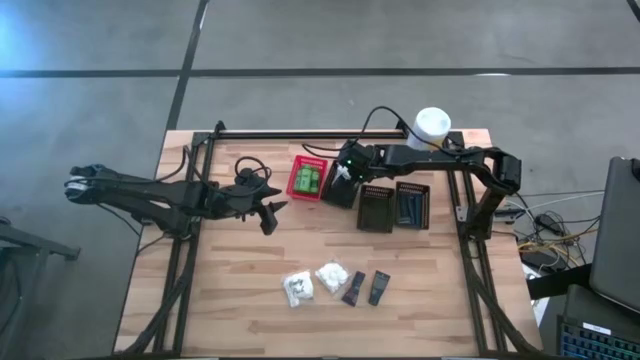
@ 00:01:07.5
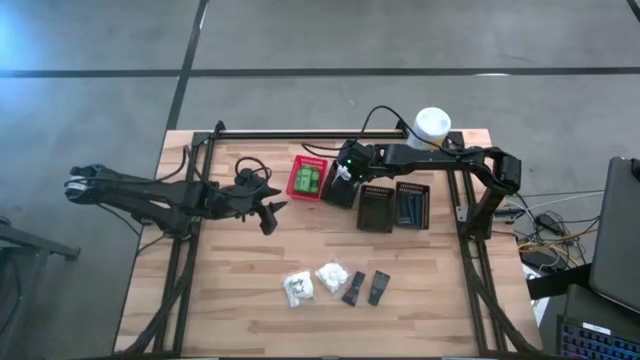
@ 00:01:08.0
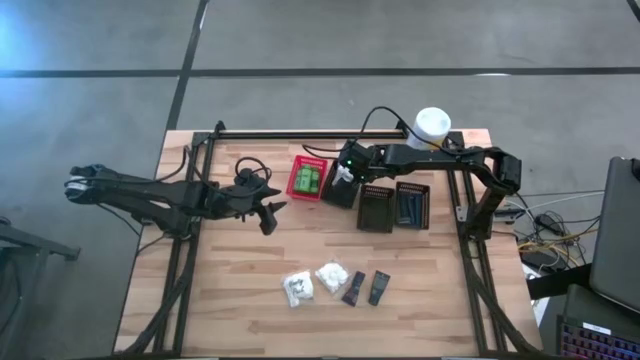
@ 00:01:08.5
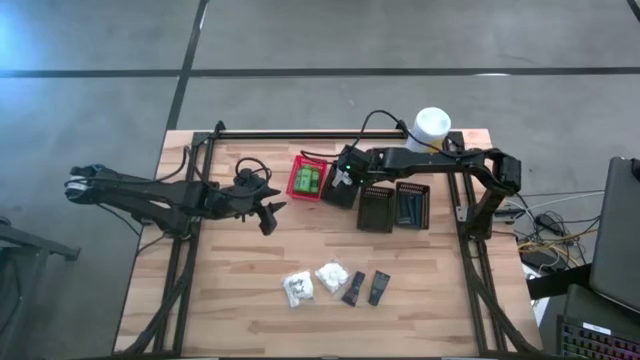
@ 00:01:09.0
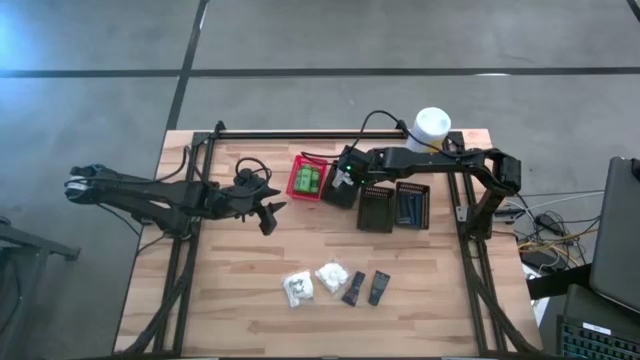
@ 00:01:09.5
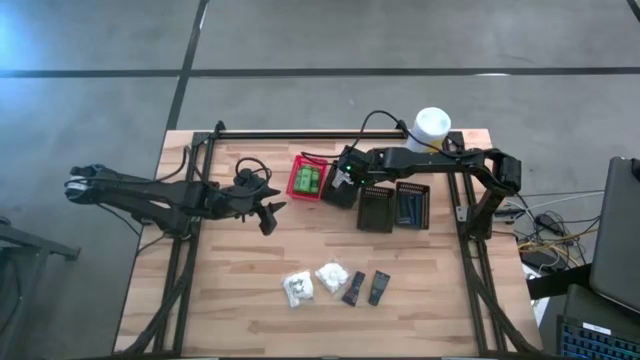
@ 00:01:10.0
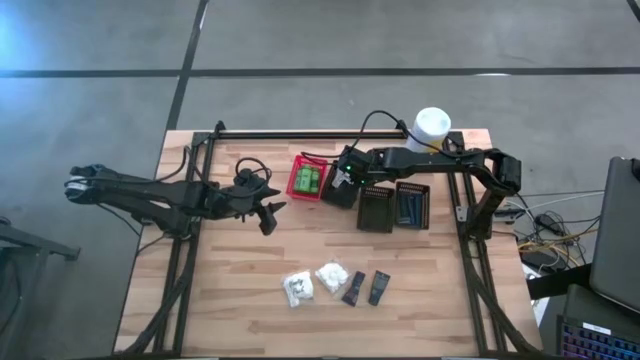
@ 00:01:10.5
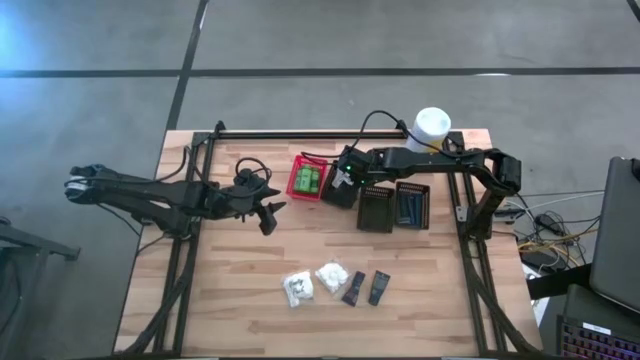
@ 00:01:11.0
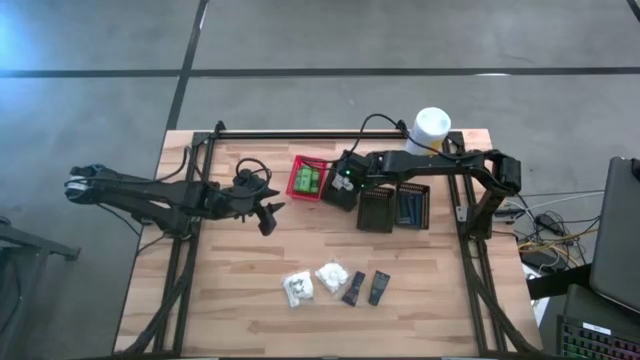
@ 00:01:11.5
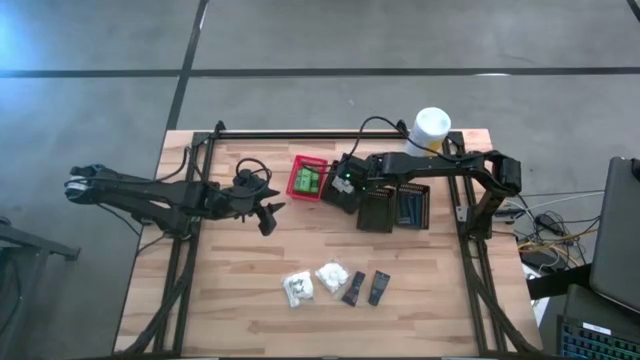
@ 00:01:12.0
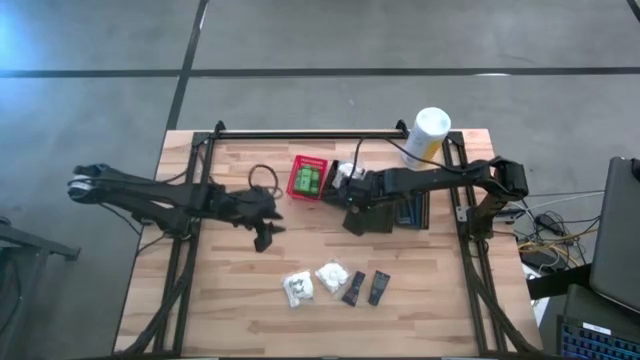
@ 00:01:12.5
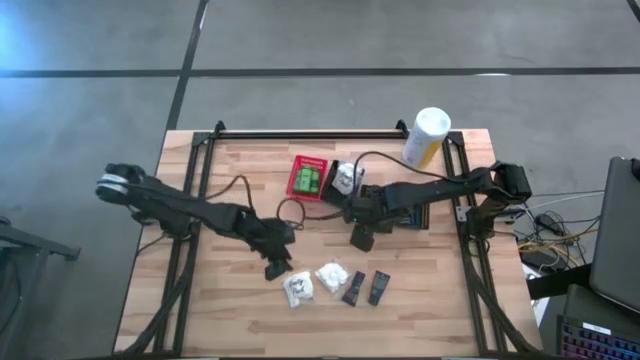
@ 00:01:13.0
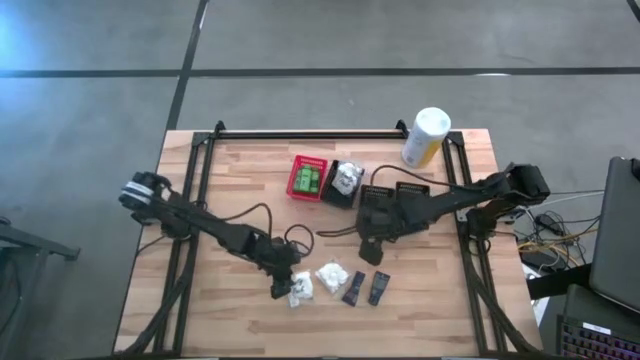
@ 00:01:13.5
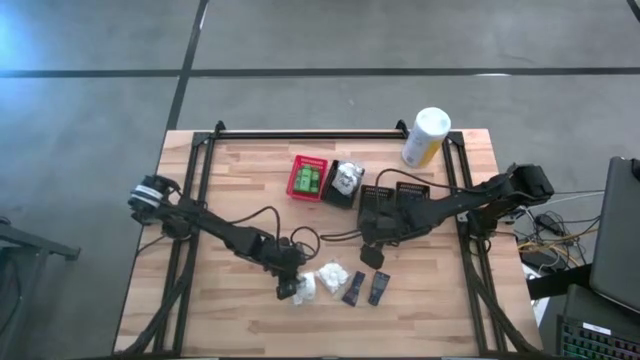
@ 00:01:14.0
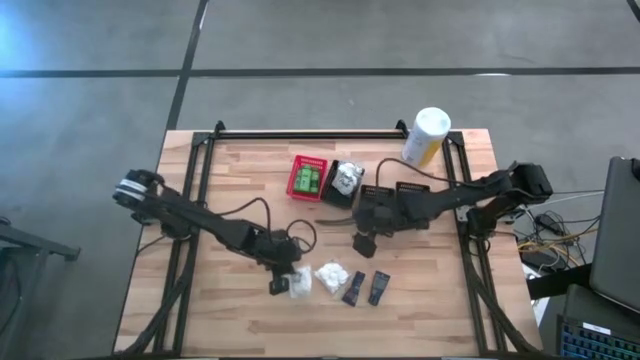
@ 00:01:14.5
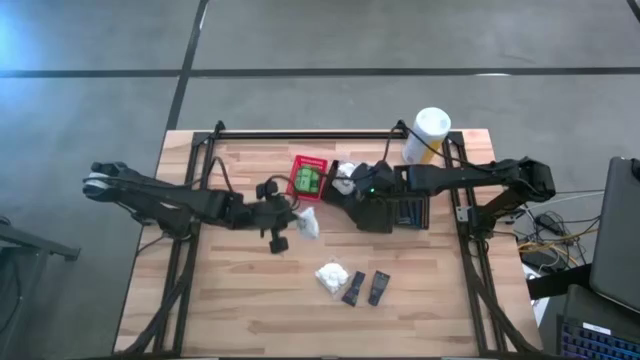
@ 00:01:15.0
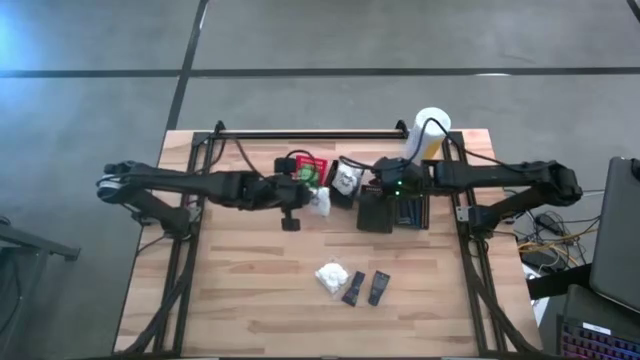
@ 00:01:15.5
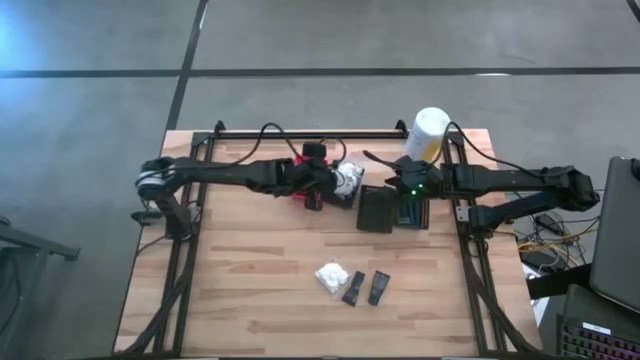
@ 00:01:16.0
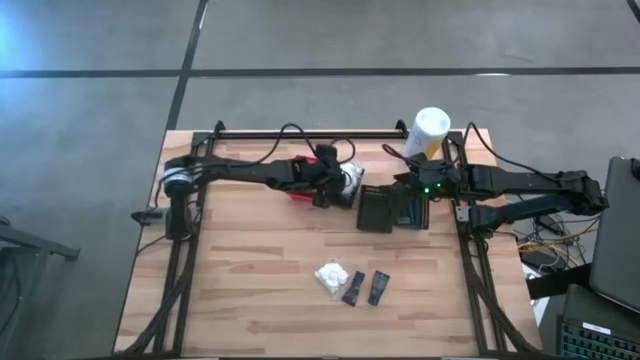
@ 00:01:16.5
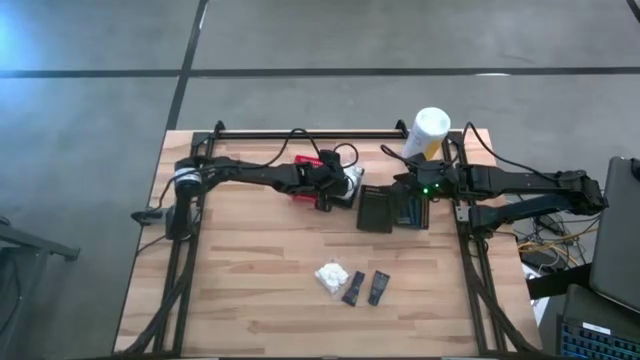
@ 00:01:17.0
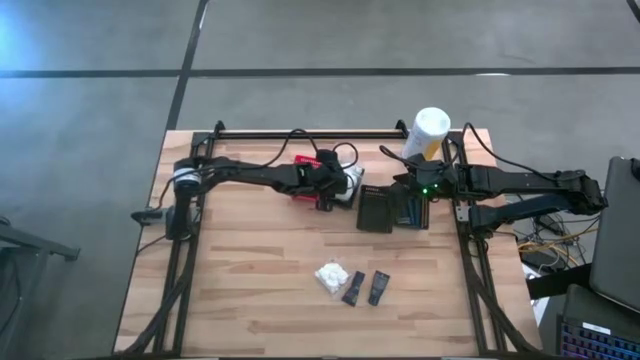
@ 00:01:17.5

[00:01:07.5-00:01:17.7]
Task: Pick & Place Travel size toiletries
Put the cotton pack into the left black bin

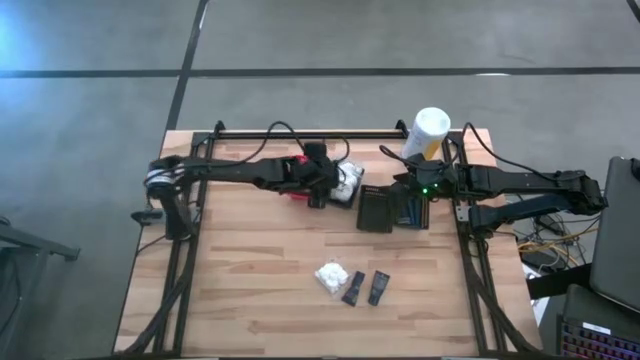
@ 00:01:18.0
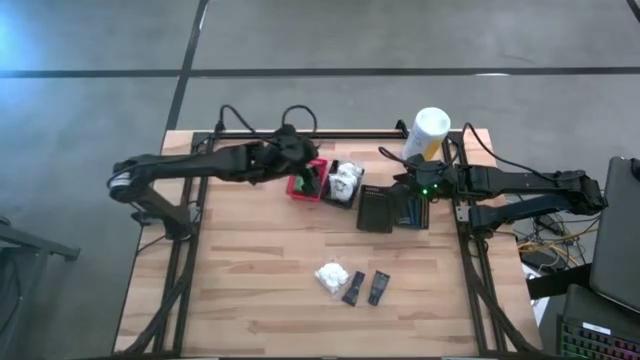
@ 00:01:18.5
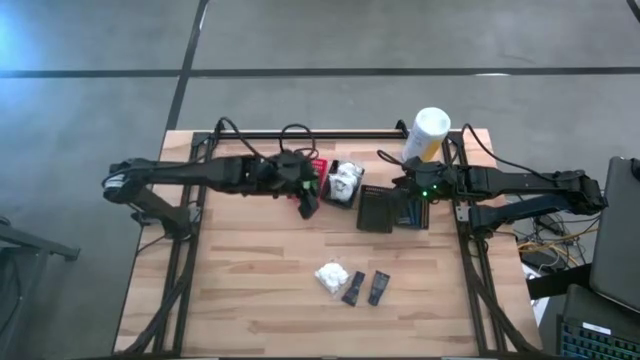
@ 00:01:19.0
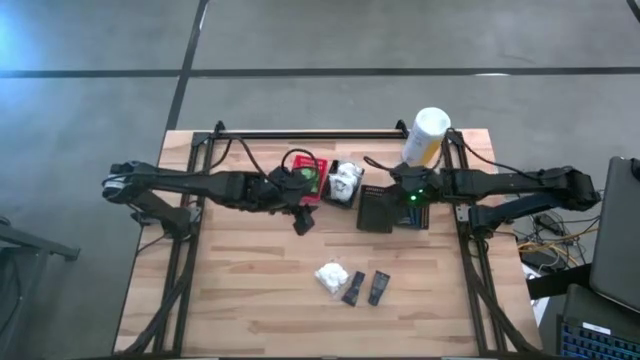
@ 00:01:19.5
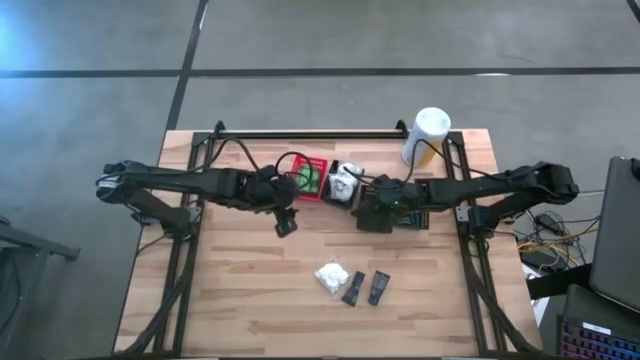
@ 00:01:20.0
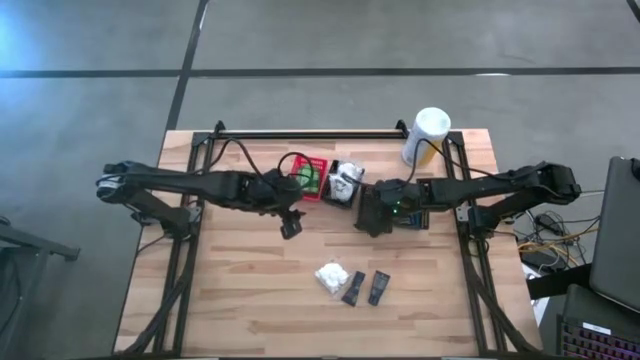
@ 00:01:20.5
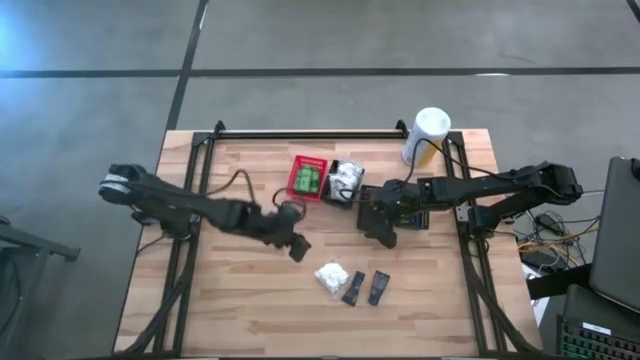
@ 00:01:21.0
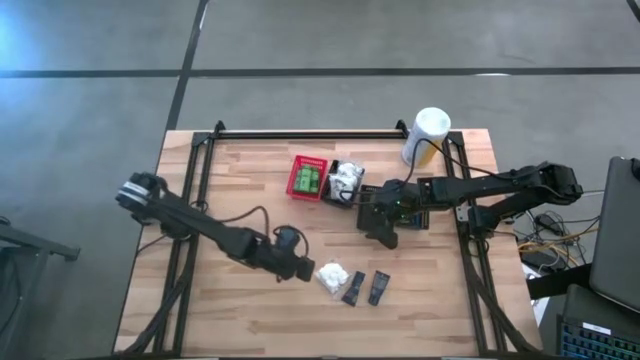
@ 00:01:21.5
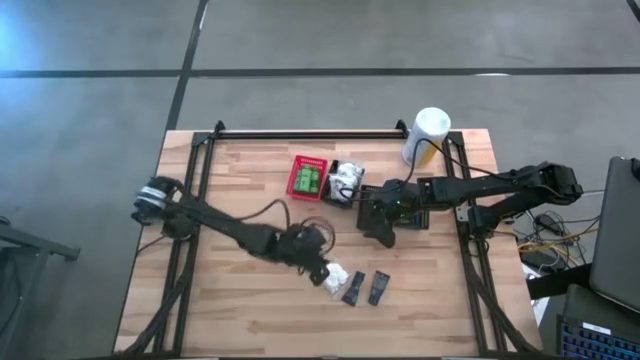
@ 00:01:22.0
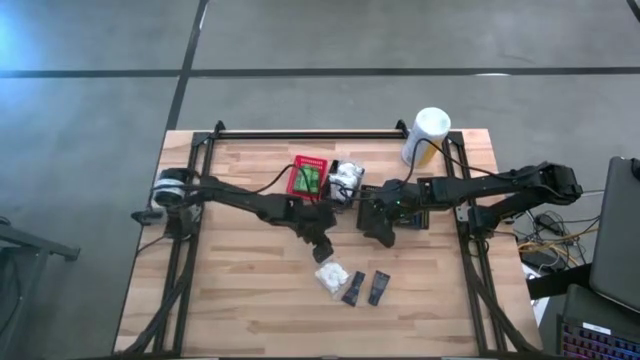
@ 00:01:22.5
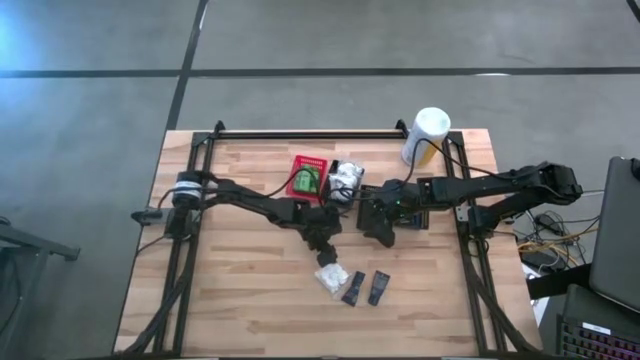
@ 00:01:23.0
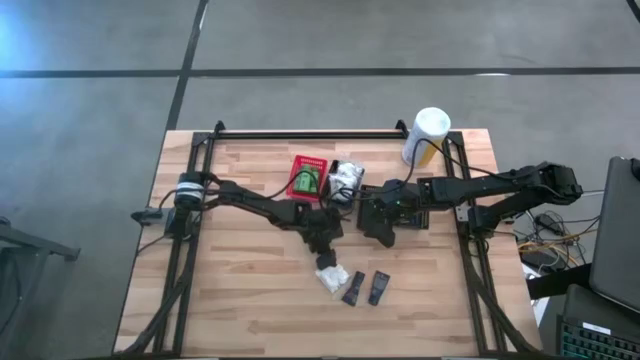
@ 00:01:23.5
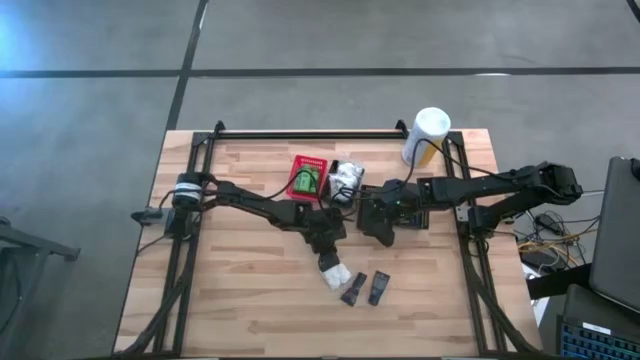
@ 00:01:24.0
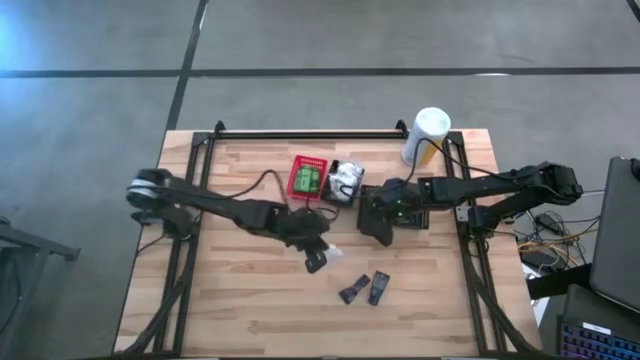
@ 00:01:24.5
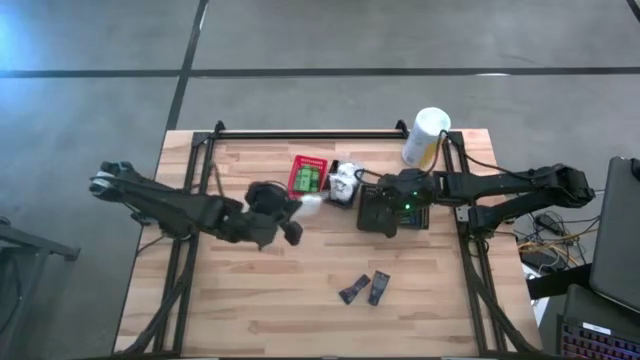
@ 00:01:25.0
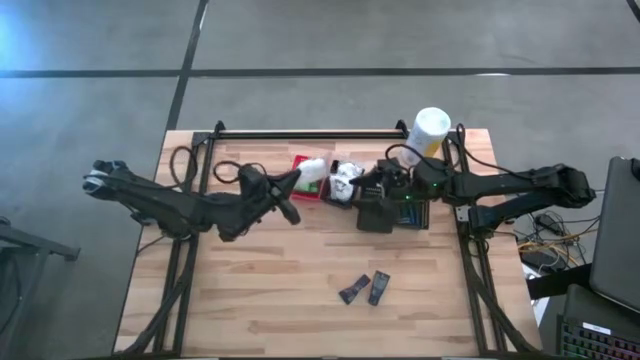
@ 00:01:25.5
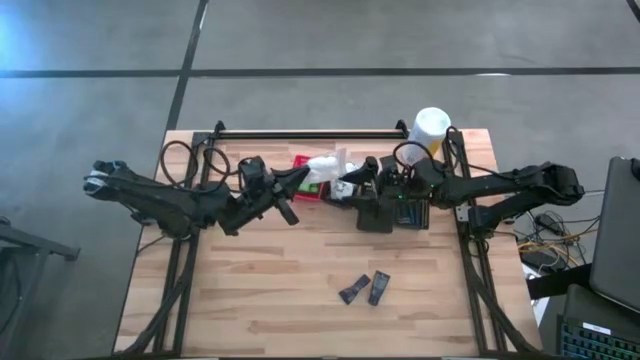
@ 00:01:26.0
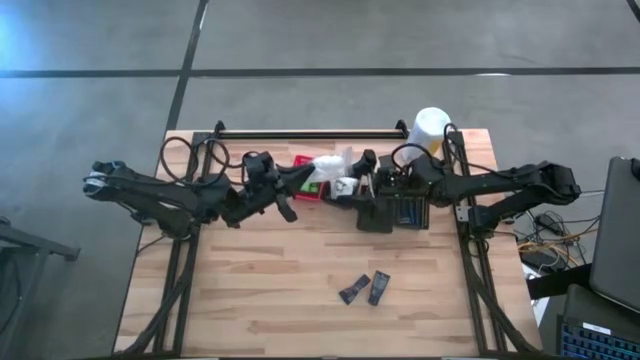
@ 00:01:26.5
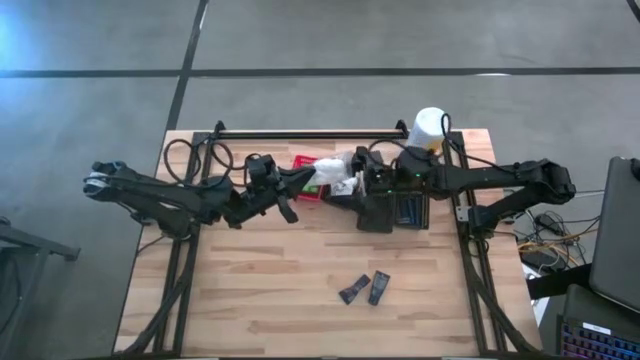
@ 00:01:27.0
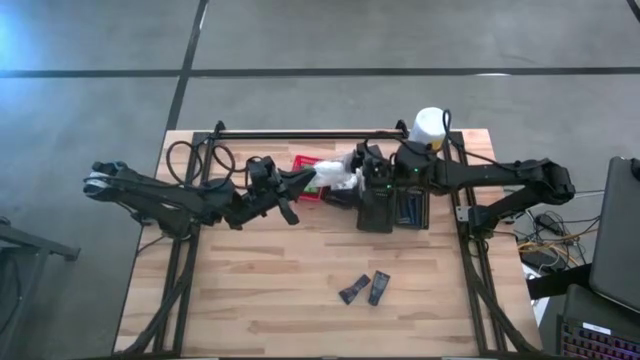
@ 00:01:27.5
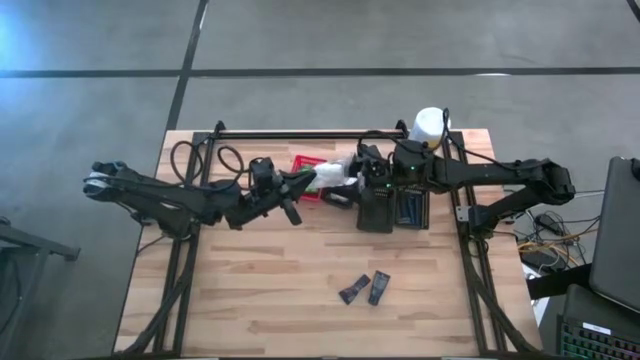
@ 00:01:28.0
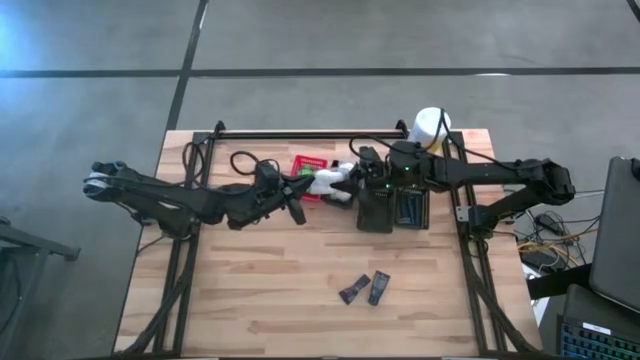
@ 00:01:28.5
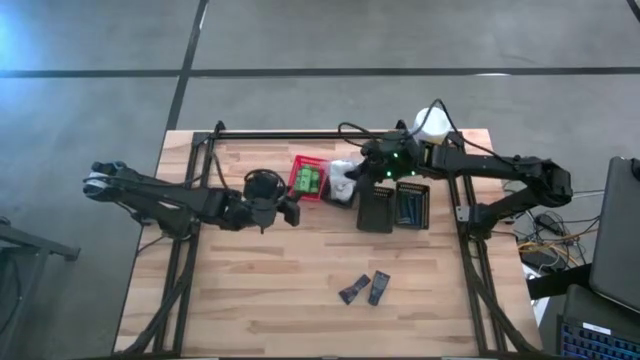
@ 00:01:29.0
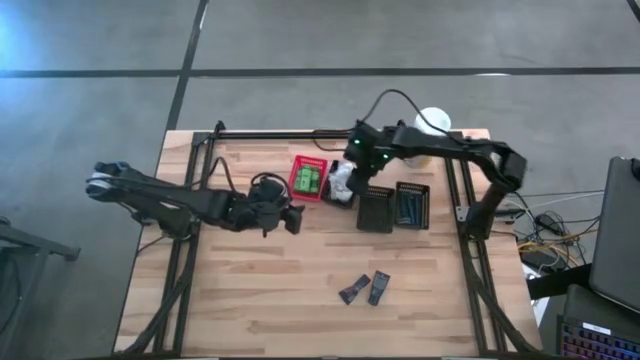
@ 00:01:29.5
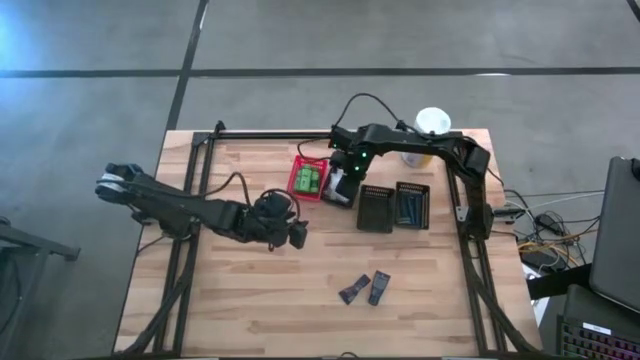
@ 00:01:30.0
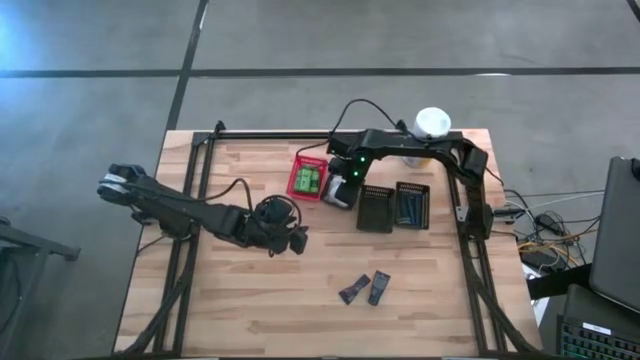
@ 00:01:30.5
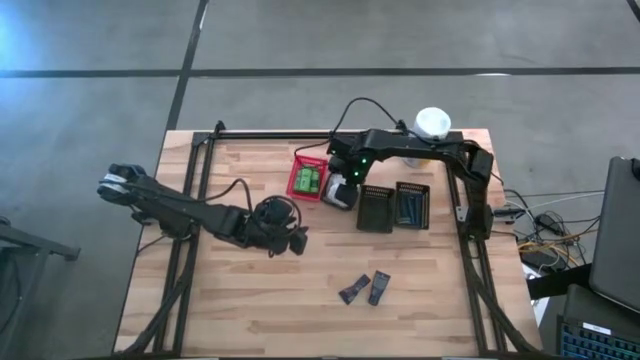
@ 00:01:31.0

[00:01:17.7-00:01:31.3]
Put the cotton pack into the left black bin
